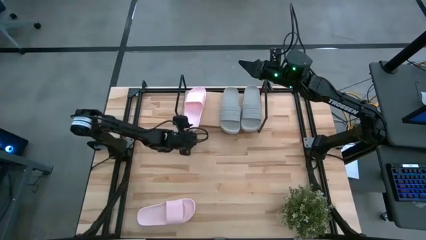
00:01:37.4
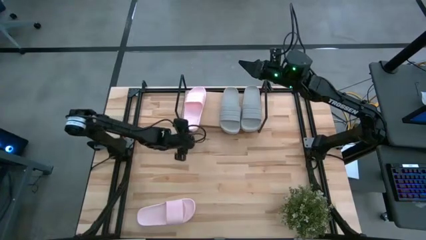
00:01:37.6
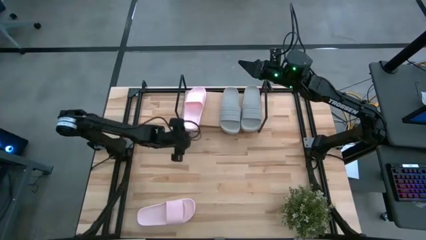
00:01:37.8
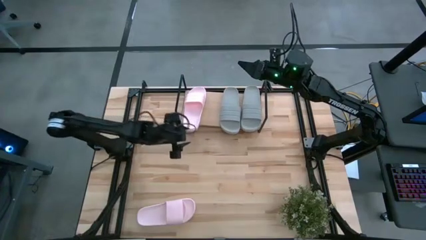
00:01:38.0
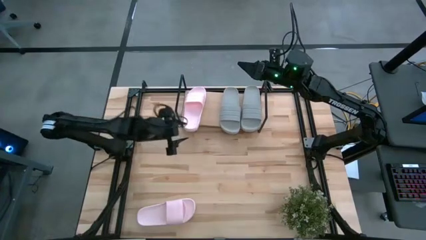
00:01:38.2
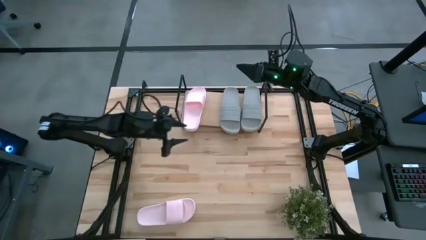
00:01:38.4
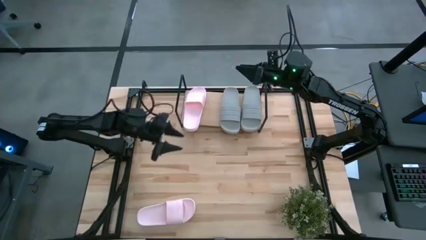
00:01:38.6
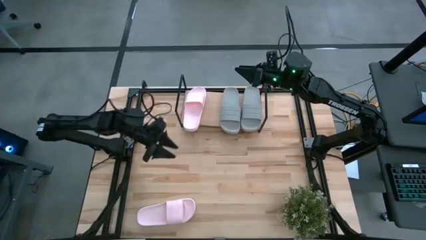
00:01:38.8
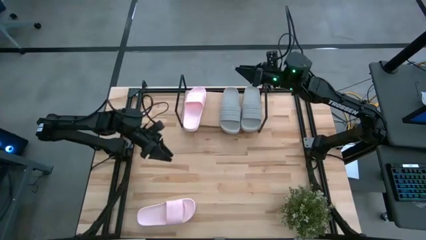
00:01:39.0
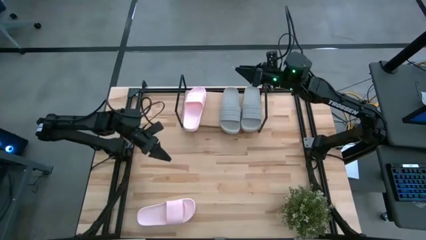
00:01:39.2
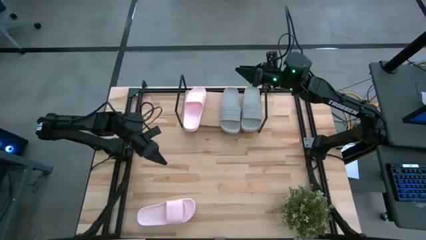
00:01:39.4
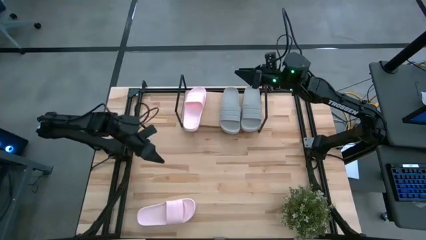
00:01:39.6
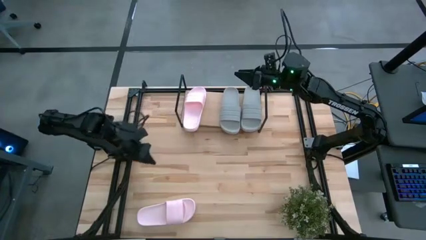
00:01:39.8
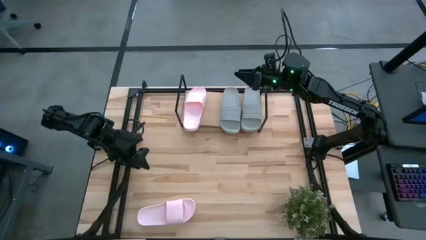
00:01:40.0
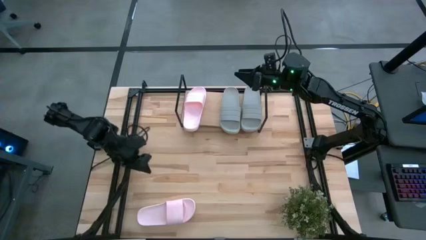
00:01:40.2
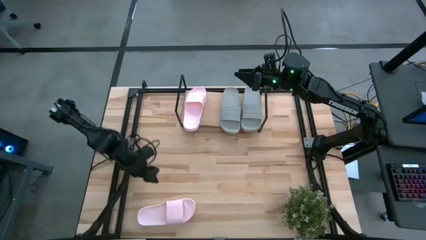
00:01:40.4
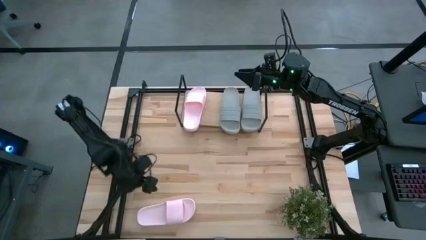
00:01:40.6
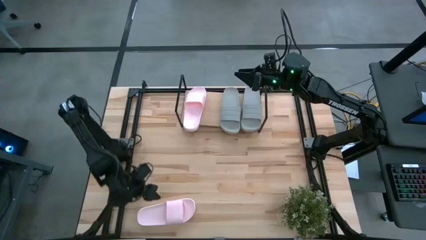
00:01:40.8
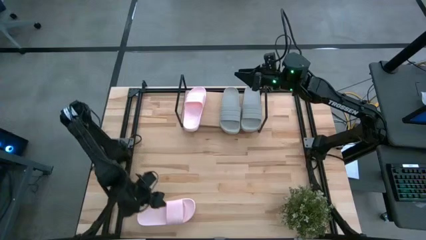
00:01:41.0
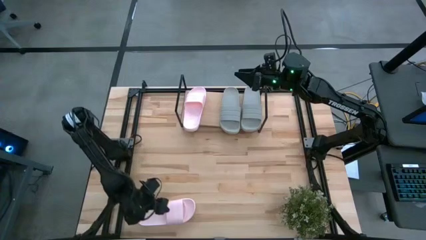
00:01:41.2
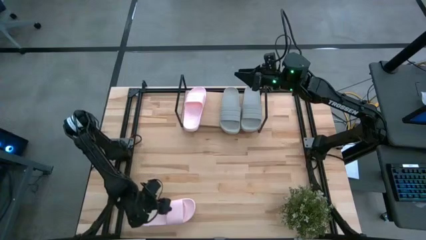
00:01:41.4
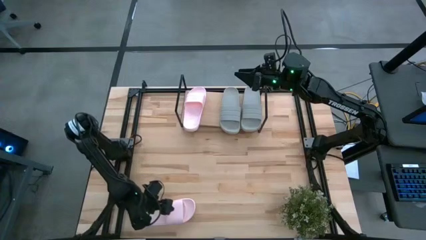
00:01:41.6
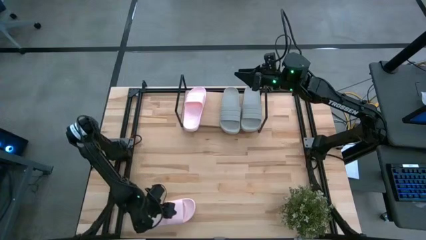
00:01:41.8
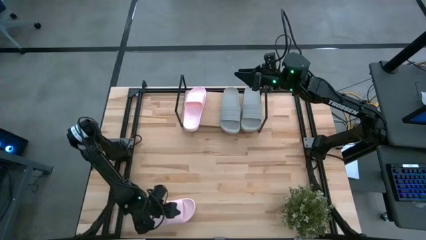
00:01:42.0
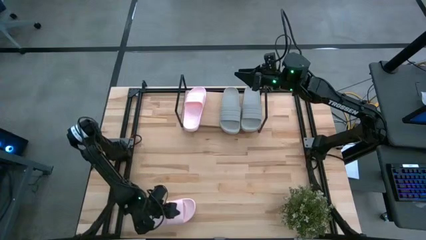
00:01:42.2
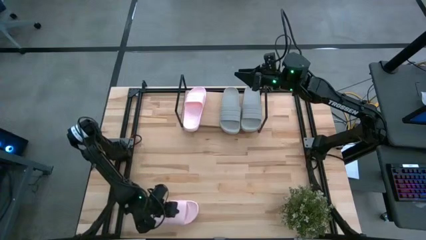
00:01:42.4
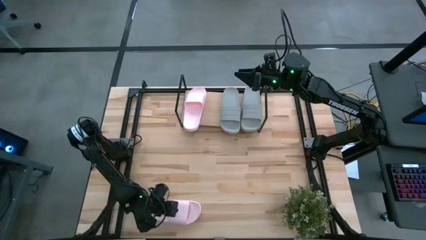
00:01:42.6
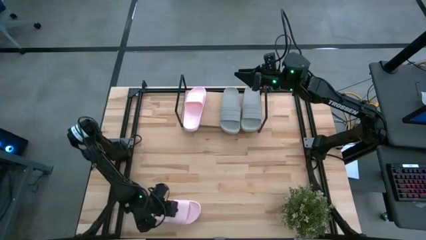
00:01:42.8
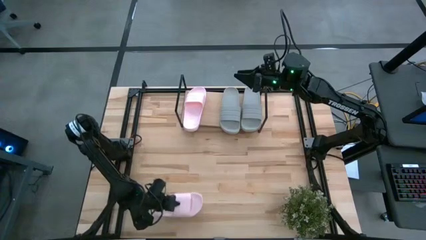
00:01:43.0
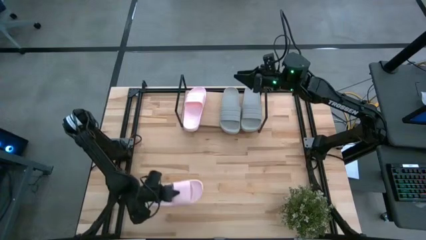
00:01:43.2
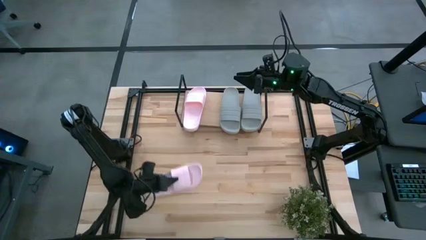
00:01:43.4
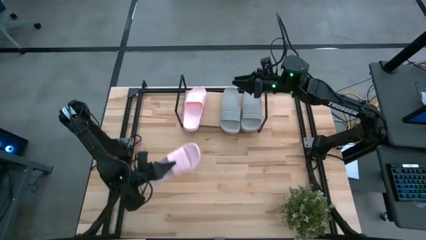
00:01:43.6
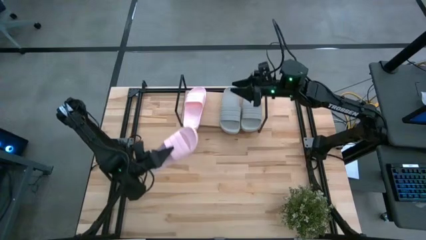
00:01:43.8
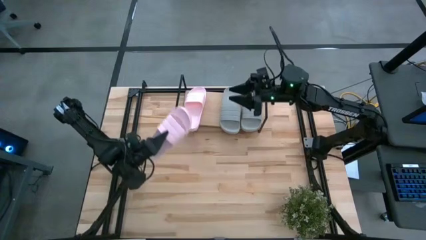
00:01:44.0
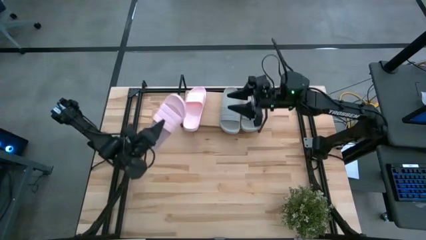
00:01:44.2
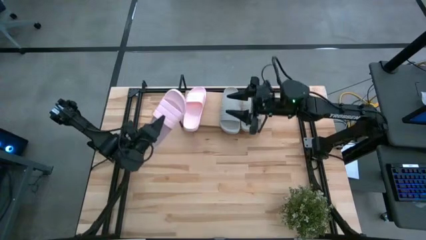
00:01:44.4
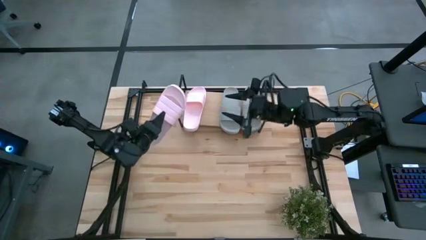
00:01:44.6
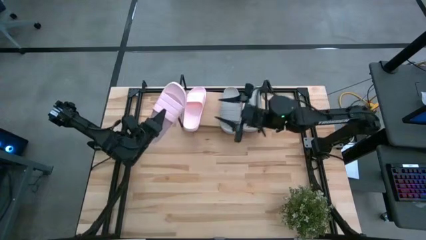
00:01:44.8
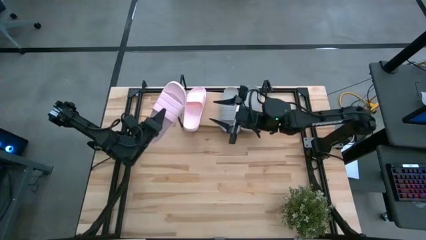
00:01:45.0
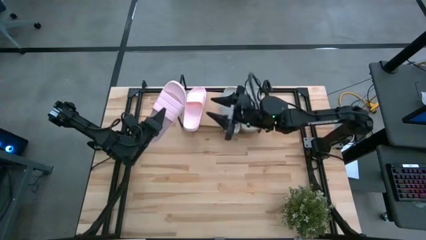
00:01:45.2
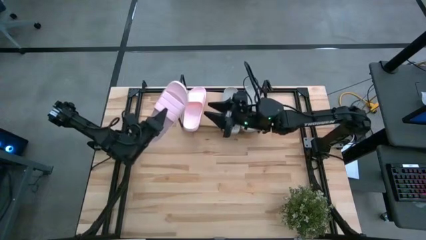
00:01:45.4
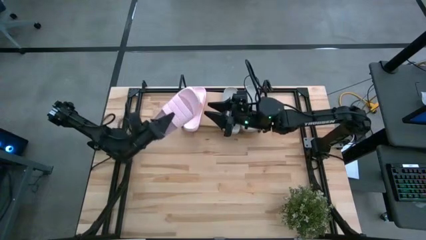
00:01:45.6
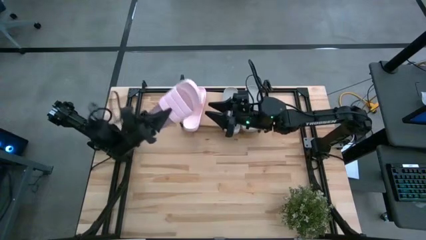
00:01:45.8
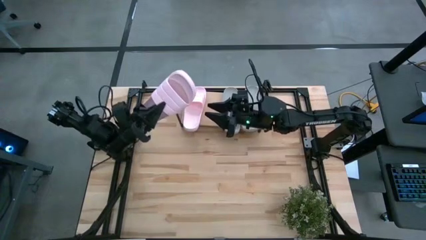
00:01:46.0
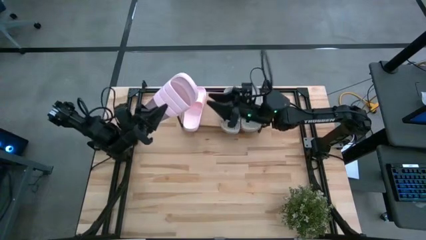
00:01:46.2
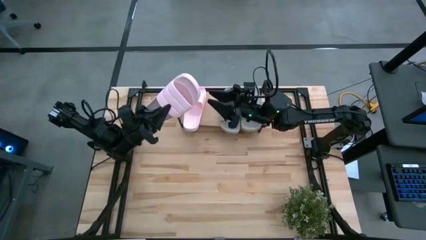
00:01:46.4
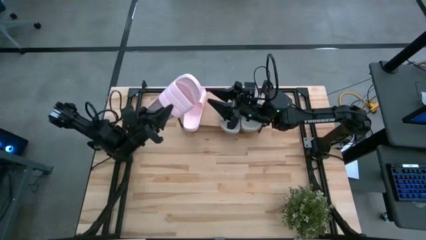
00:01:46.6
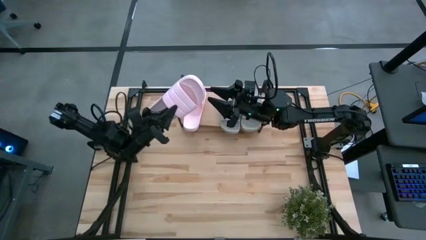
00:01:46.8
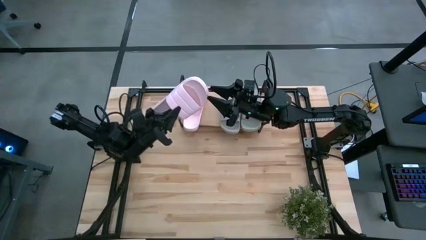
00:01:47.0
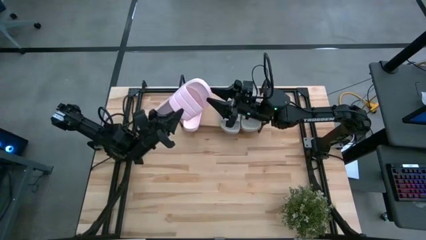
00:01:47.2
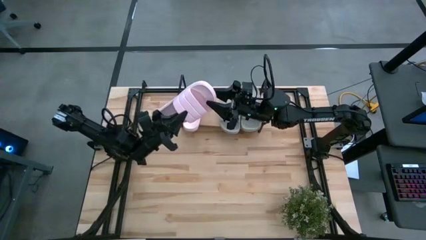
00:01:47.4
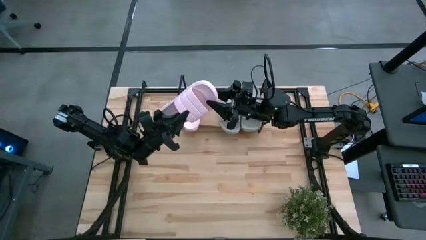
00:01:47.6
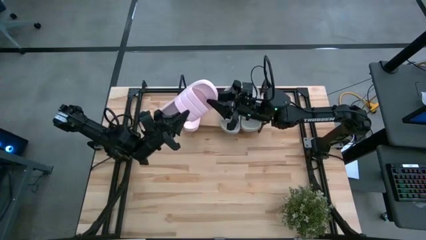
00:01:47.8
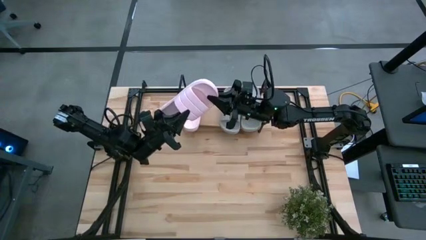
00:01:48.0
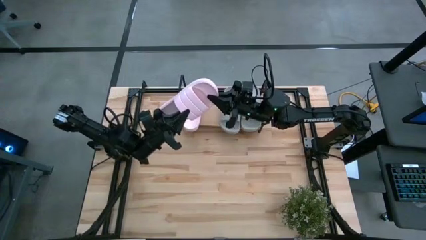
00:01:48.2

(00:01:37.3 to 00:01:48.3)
Task: Pick and place slides into the shelf
Put the pink slipper on the shelf

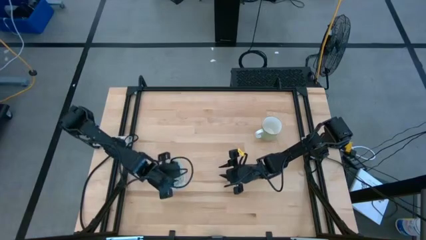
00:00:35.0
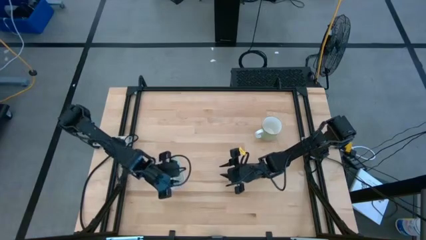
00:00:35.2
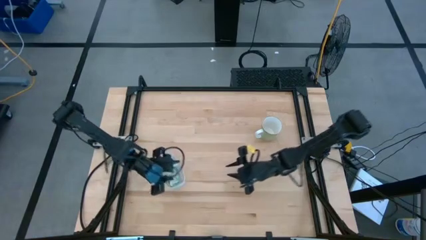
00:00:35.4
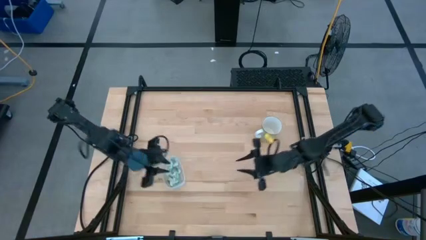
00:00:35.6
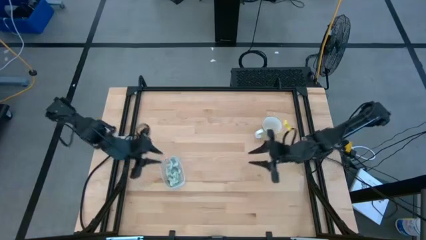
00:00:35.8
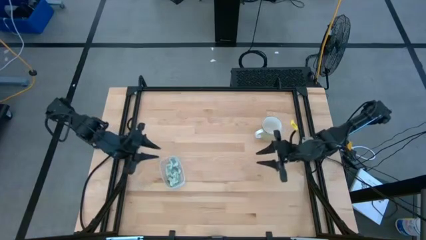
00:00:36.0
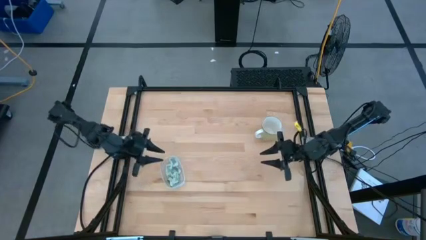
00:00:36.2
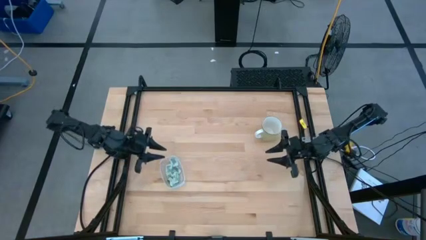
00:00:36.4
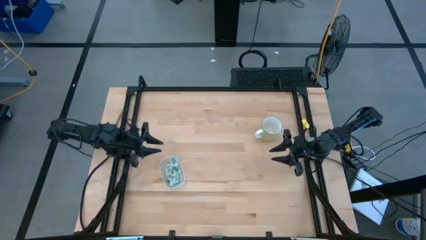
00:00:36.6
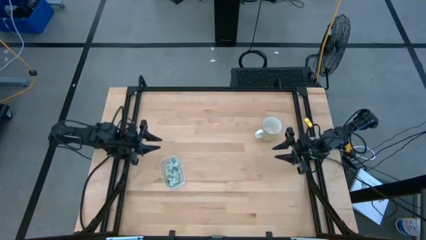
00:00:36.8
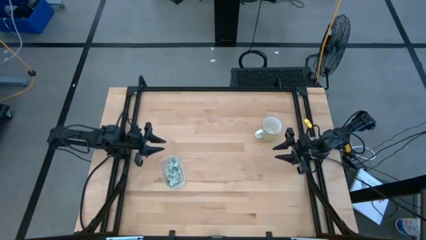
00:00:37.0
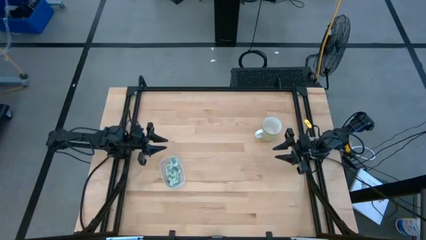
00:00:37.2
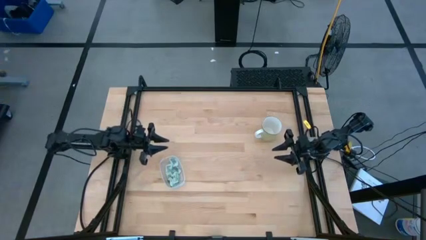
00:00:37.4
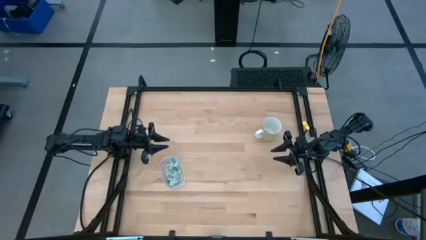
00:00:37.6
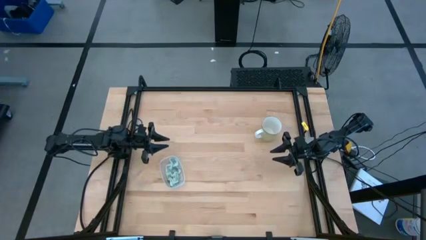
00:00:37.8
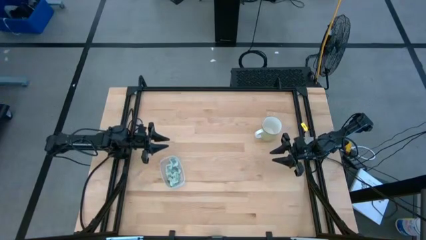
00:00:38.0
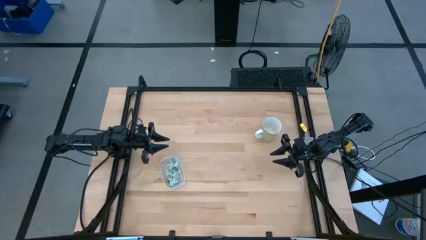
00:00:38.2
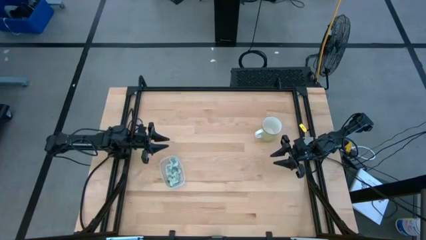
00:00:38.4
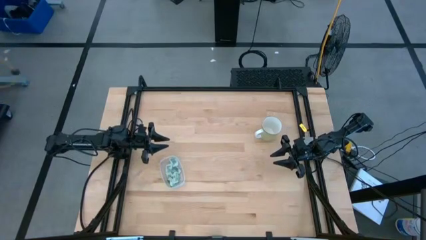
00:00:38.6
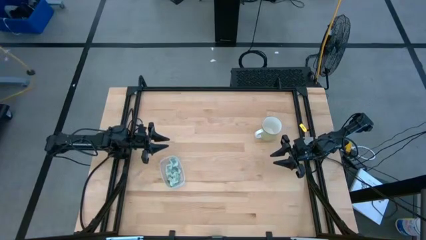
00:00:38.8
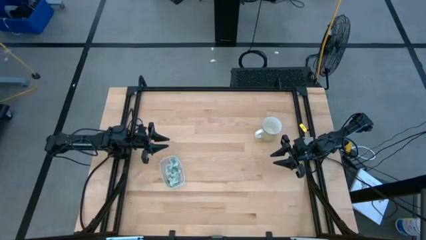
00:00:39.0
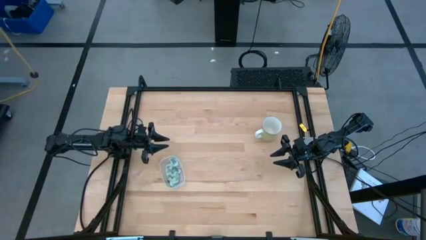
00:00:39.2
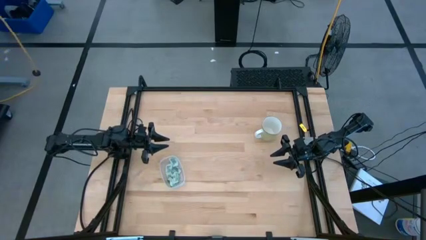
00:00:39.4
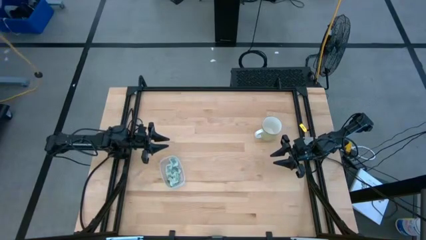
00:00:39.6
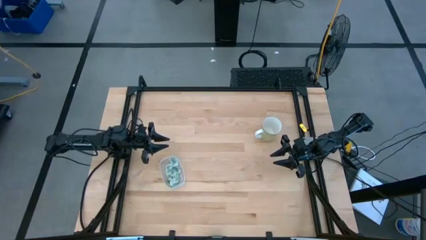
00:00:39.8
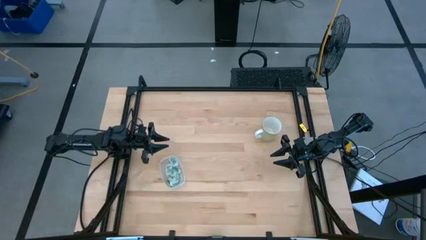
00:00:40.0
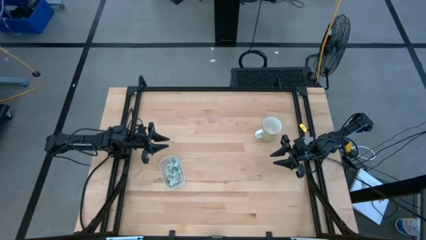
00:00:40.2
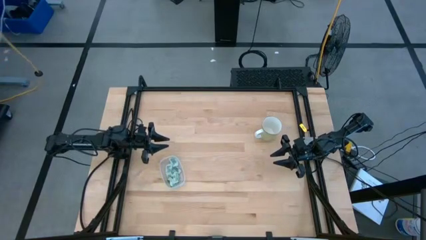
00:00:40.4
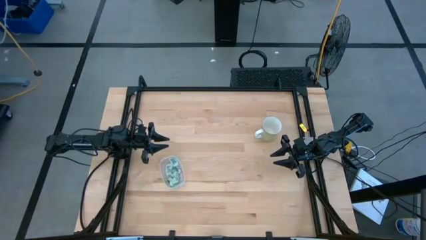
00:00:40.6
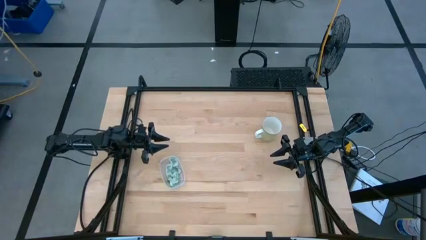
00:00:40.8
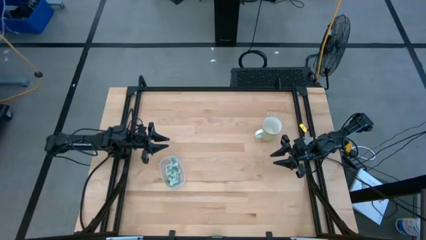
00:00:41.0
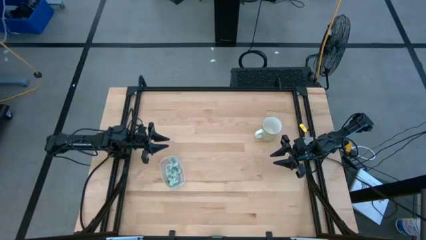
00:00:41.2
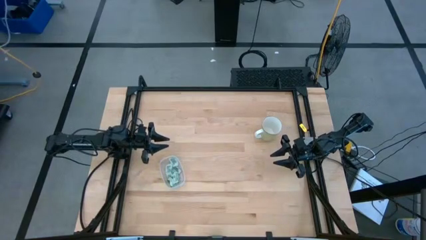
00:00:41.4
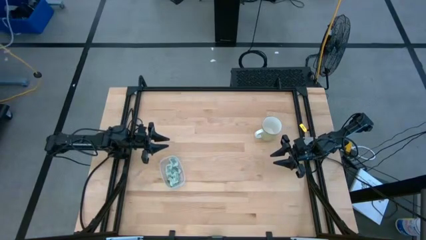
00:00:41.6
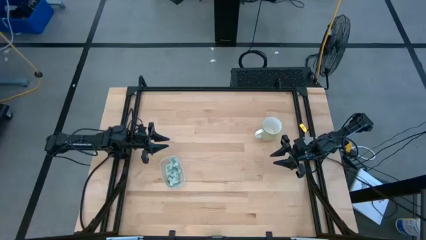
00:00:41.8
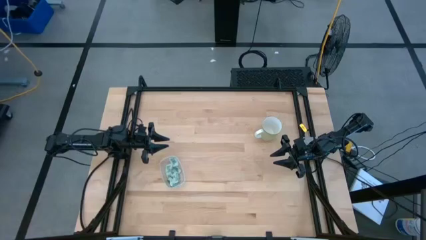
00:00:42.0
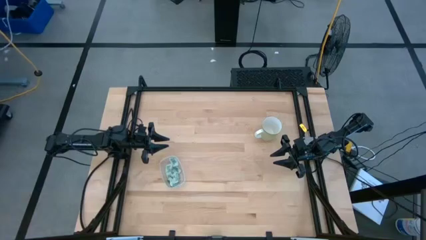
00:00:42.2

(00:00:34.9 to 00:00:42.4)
Task: Pick and place Stevia / Truvia into bins
Return to Home Position
